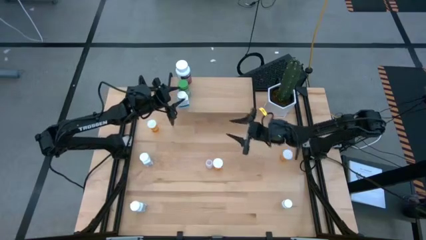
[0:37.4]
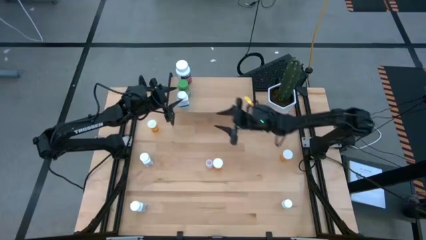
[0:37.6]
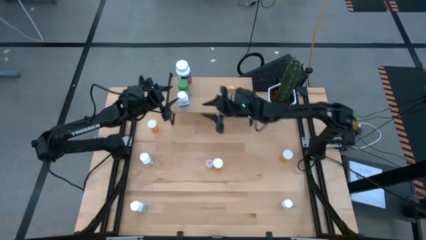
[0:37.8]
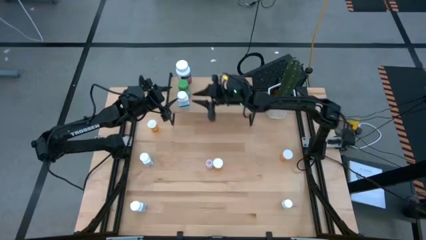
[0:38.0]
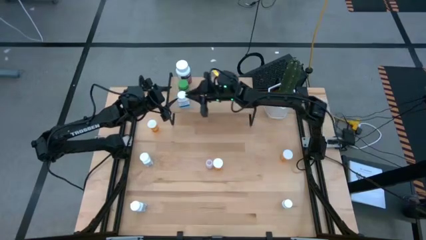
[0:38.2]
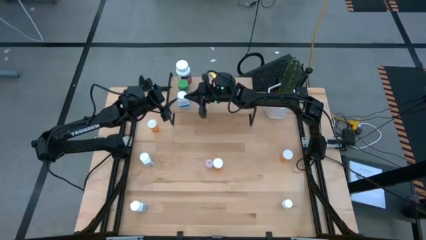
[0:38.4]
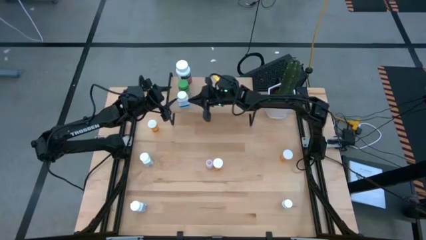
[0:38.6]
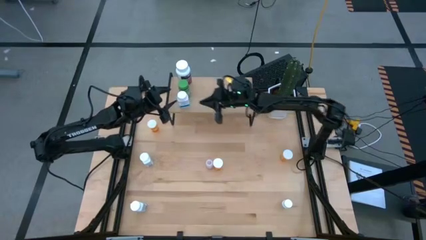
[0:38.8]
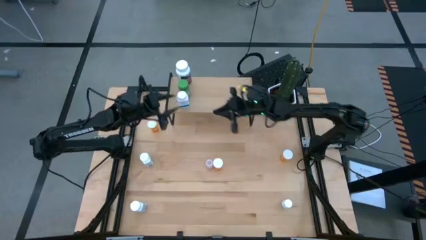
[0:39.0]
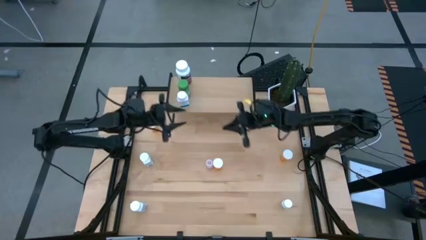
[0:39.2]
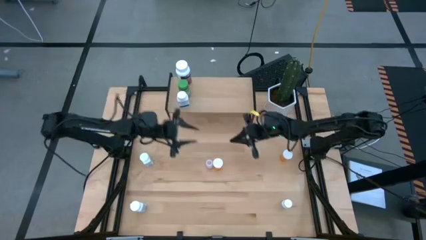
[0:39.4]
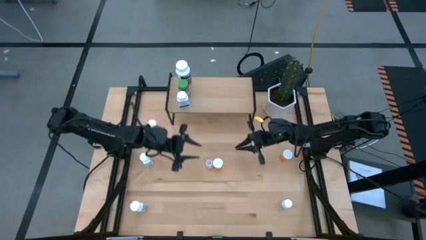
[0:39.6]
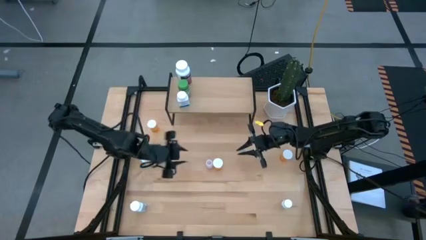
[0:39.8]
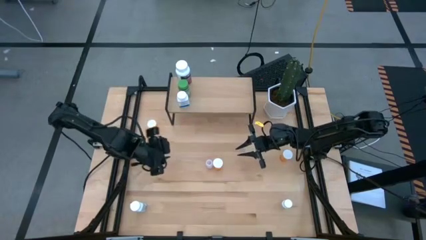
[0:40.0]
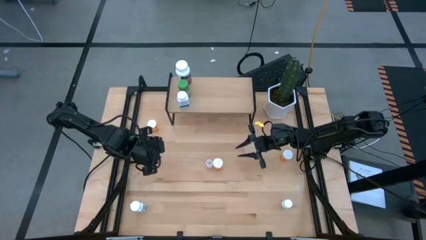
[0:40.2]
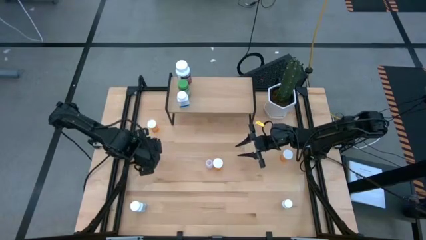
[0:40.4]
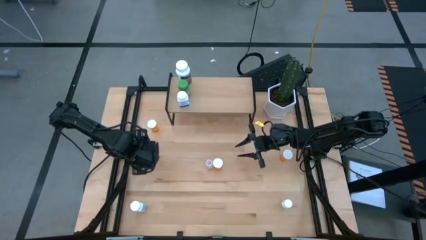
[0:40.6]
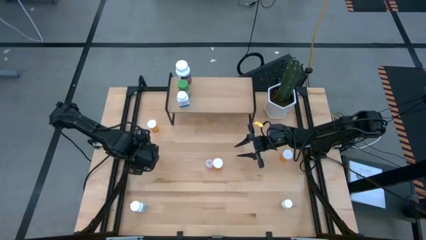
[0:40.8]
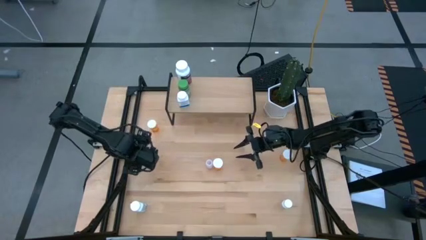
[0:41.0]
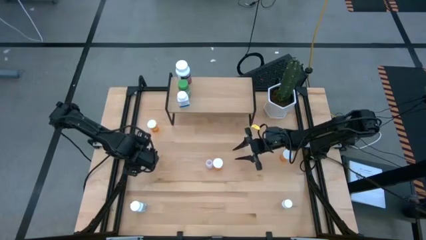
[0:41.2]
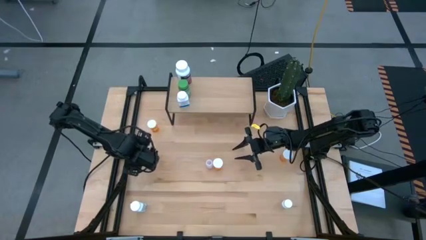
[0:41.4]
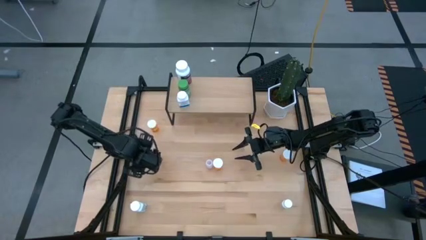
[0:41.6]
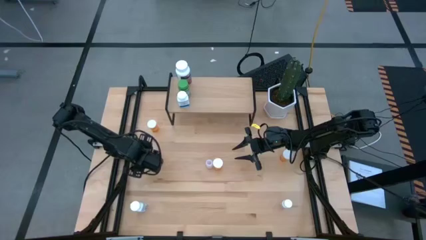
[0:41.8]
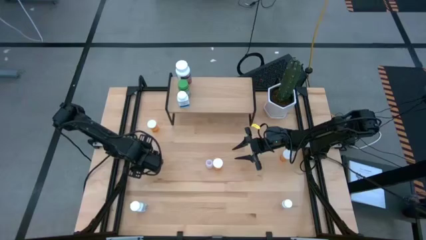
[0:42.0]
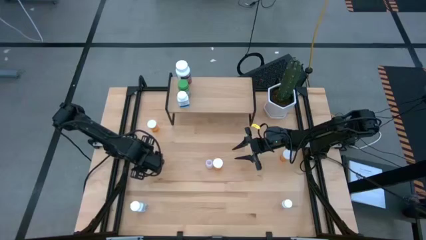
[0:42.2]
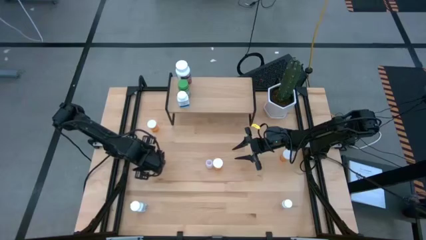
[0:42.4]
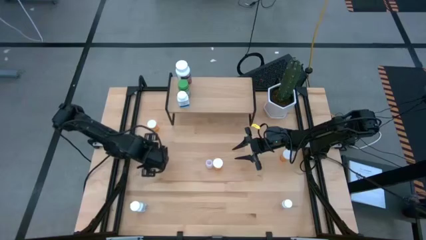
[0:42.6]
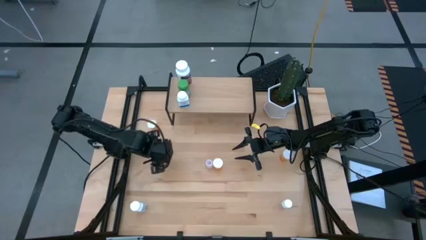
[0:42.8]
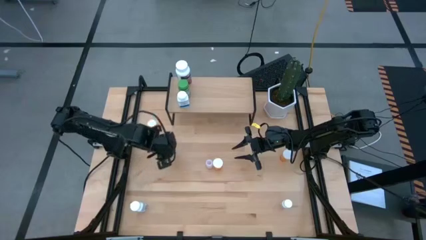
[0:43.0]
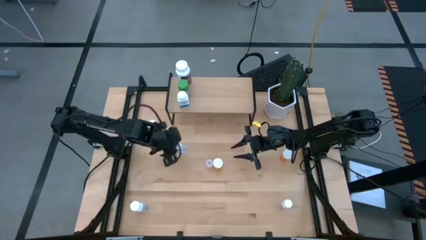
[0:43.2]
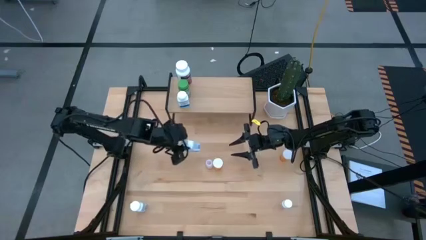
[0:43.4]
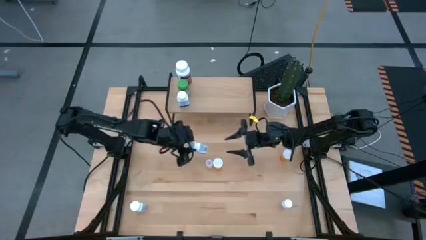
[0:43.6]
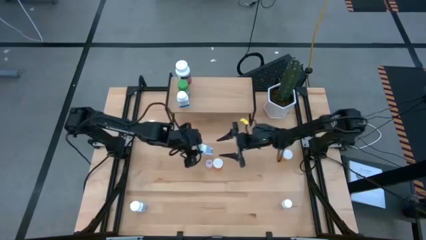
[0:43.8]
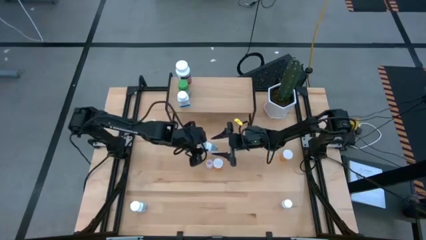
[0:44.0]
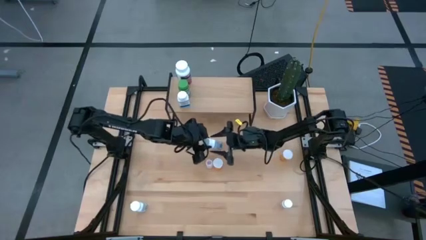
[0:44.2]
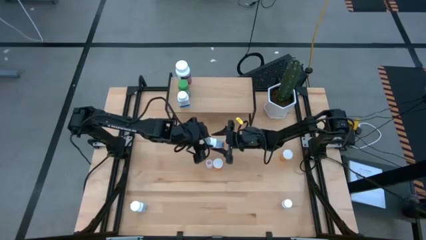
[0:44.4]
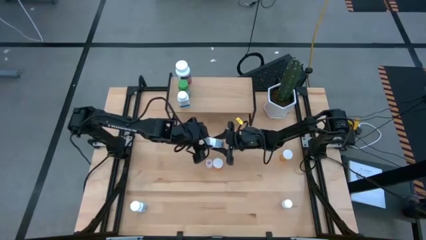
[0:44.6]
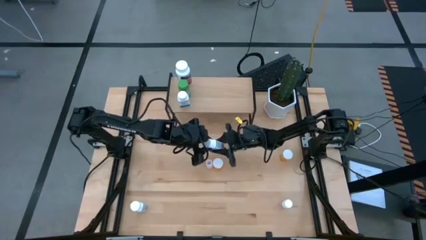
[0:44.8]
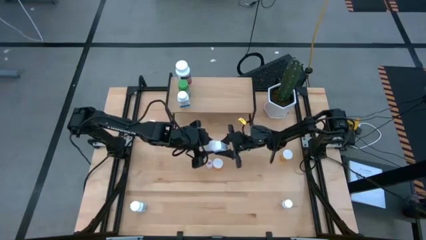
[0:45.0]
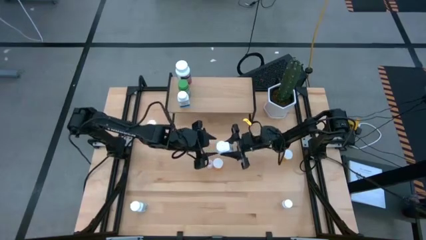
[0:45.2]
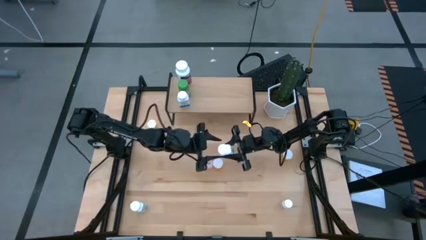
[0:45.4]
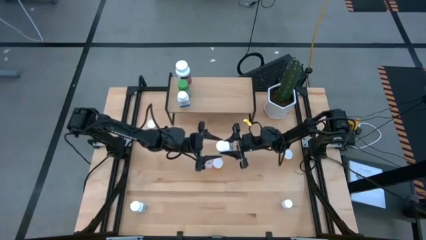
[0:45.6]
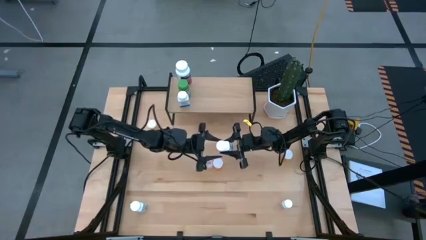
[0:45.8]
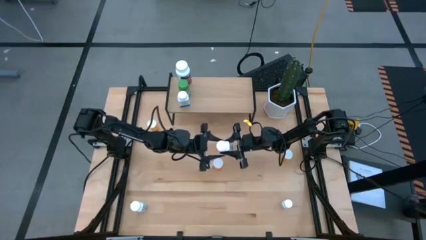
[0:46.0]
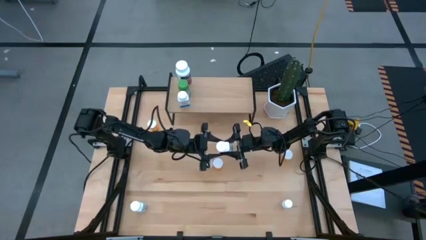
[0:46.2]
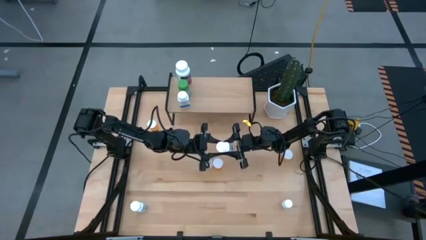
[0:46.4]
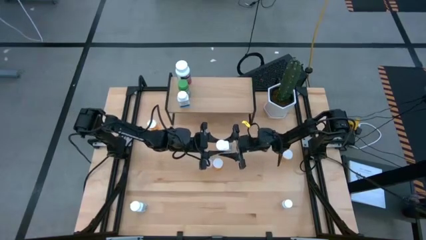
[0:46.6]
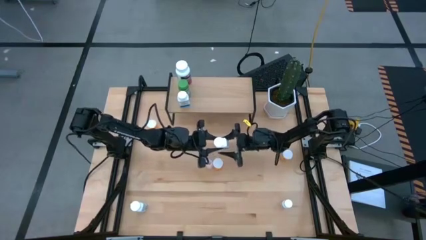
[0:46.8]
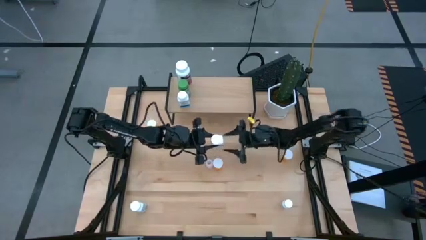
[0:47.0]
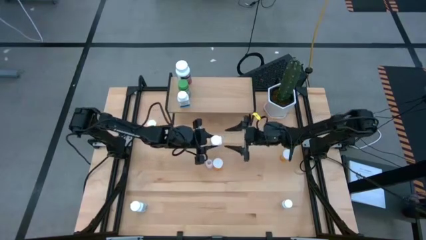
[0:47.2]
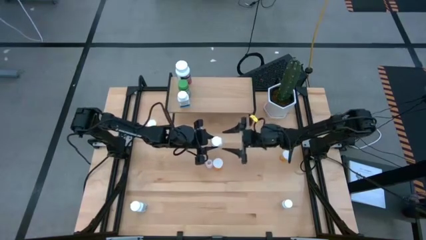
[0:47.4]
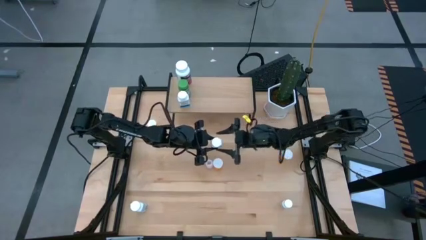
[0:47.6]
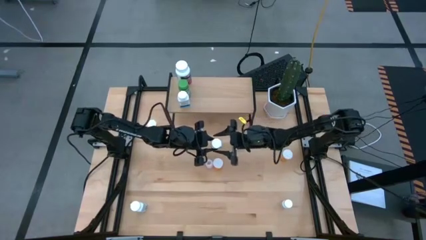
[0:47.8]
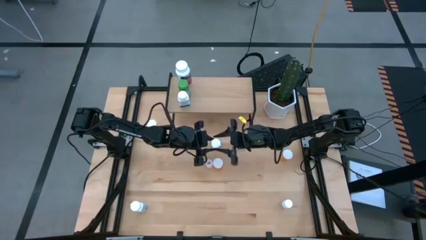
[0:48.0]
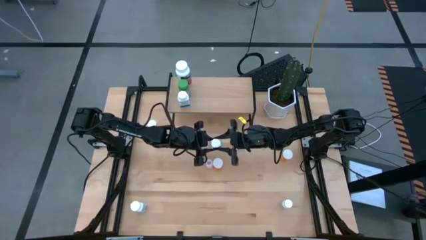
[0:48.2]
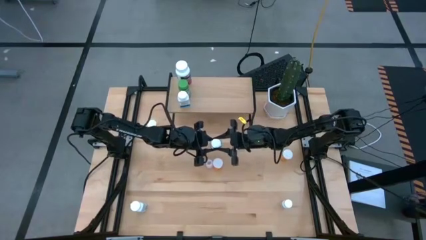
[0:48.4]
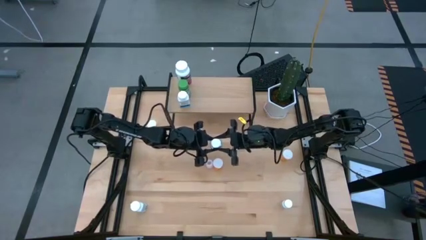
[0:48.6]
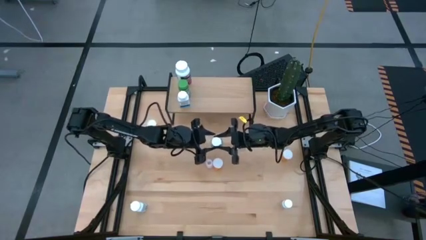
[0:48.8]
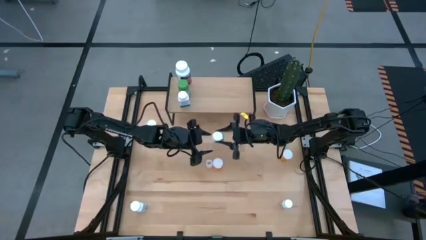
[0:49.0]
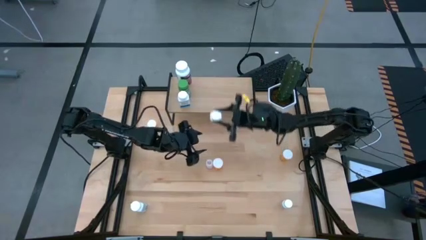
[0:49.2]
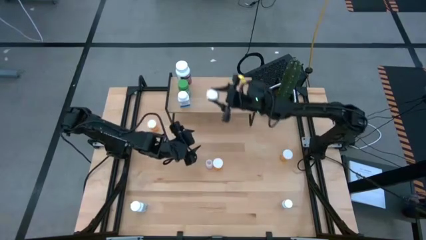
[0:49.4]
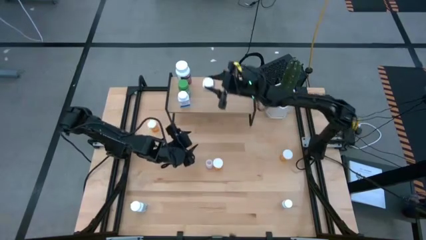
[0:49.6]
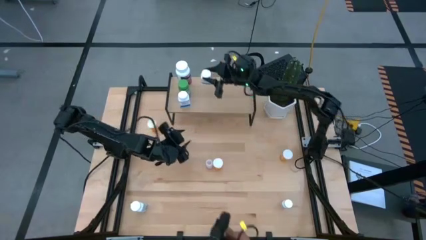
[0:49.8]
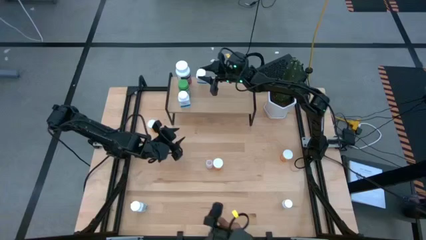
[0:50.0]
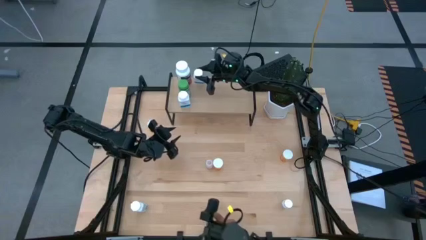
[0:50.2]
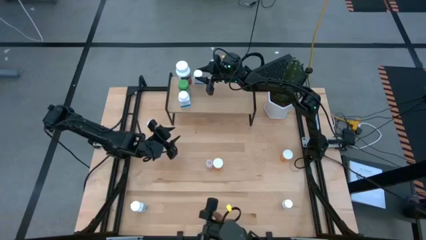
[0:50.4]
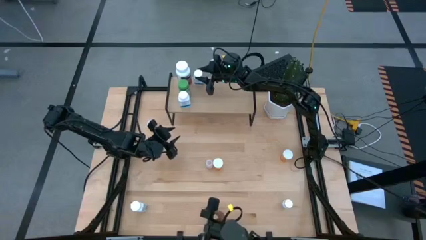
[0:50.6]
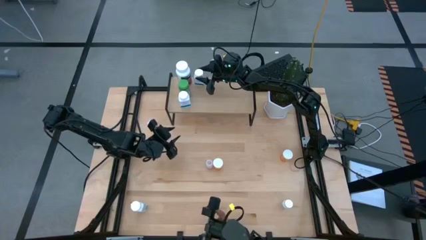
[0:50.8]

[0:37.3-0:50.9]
Task: Pick and place medicine bottles onto shelf by color
Put the white blue pill bottle on the shelf

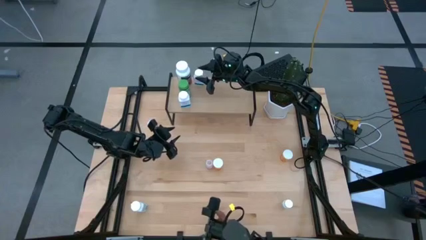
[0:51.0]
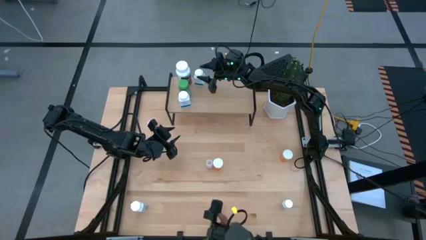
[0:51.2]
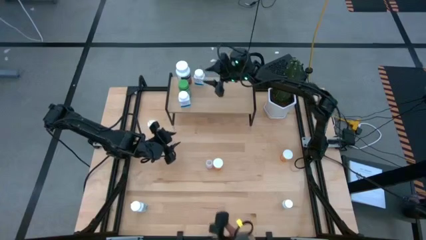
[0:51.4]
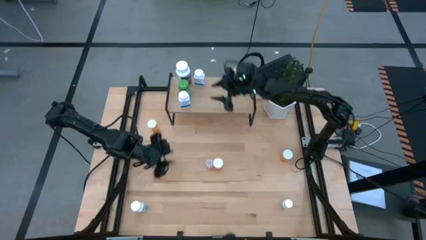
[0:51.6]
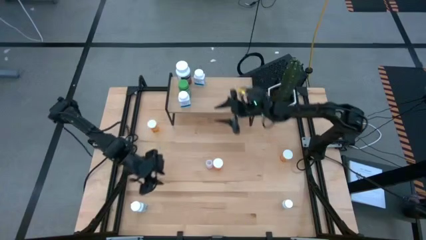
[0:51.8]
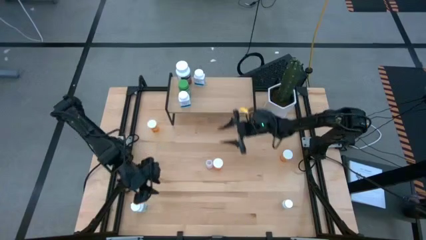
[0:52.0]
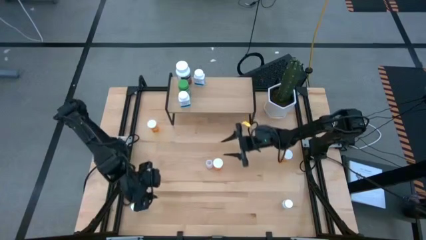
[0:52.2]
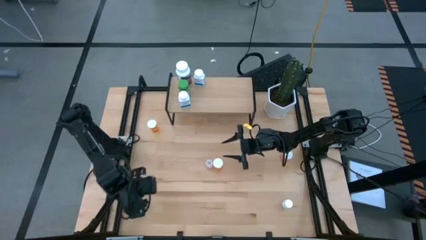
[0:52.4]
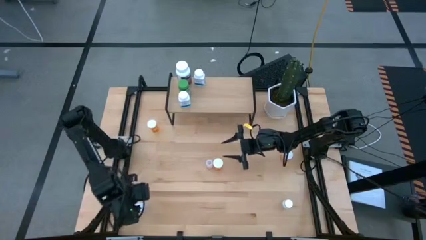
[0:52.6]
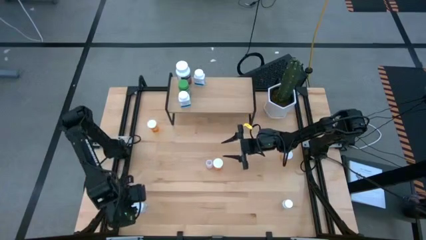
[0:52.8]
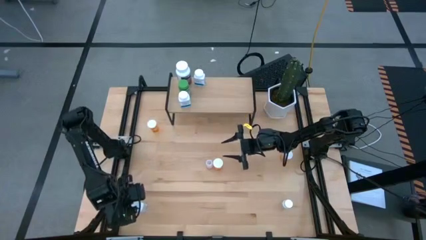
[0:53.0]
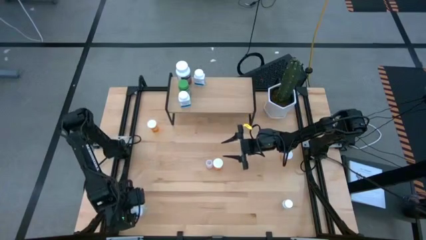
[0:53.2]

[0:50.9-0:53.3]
Put the white blue pill bottle on the shelf aligned with the other white blue pill bottle to the right
